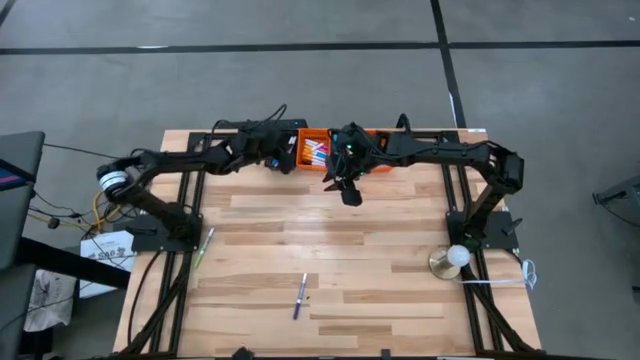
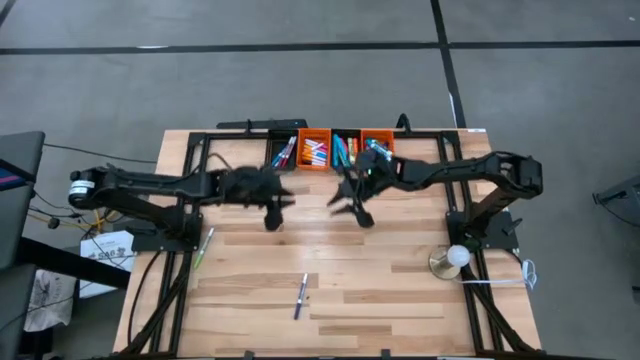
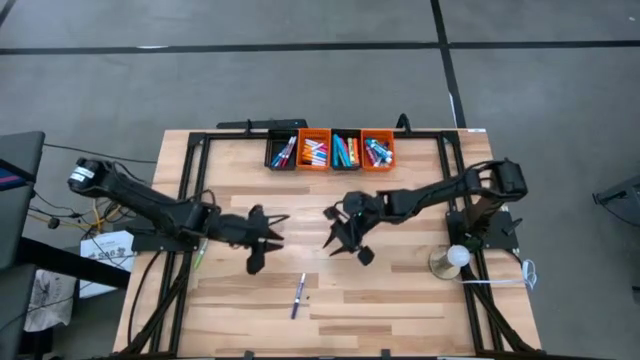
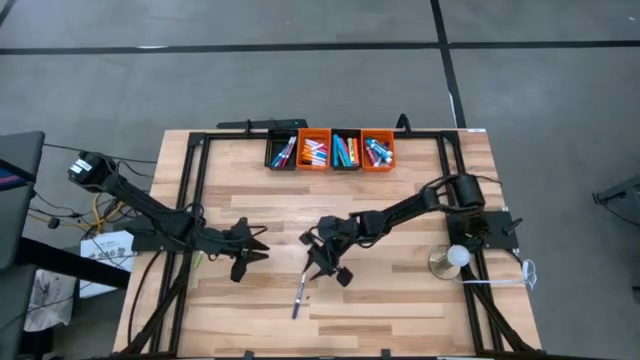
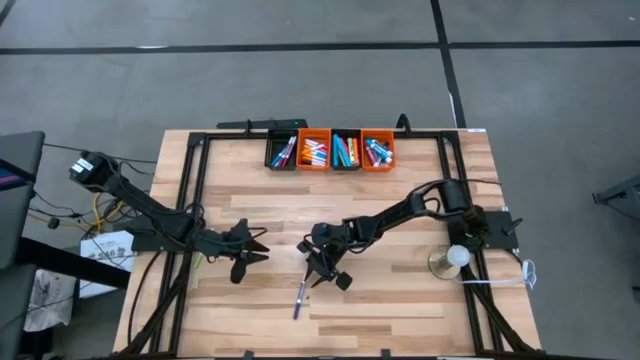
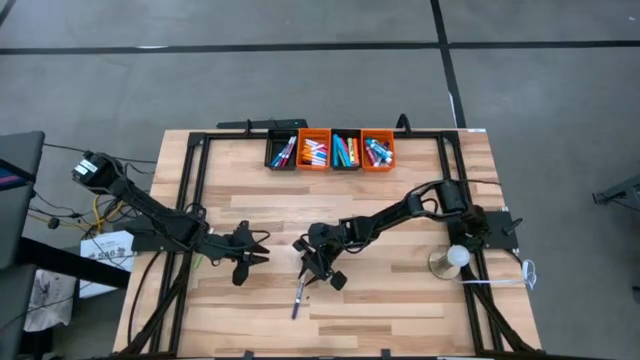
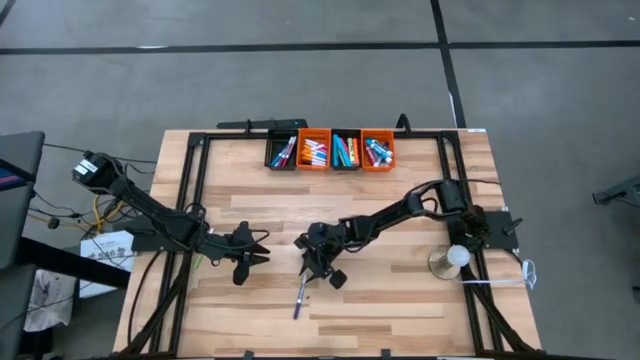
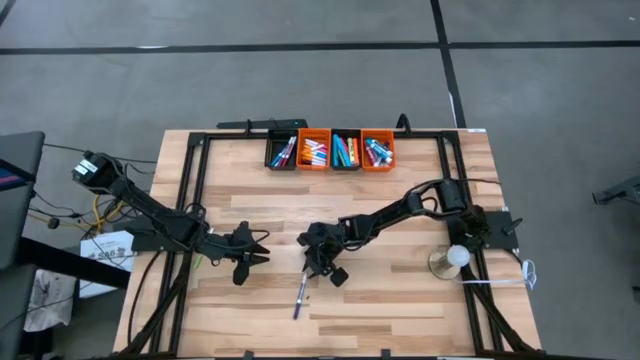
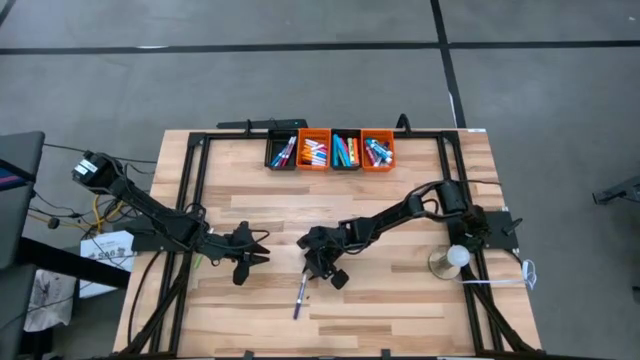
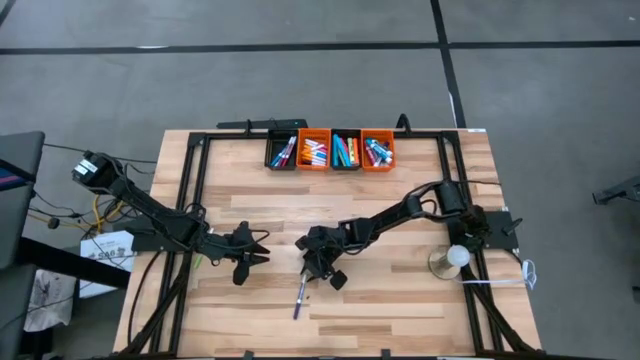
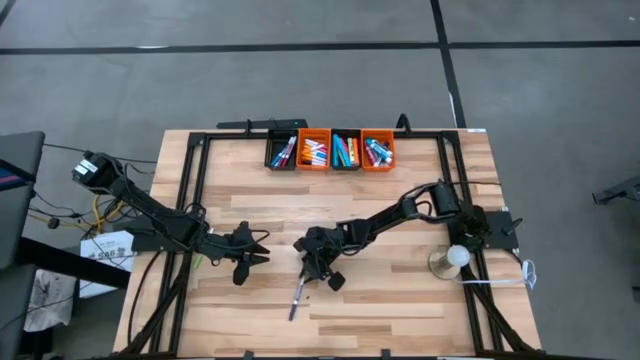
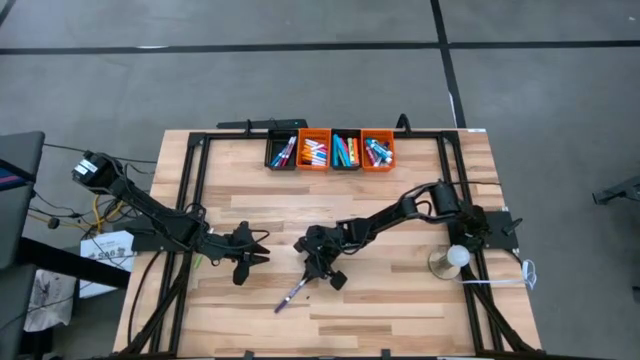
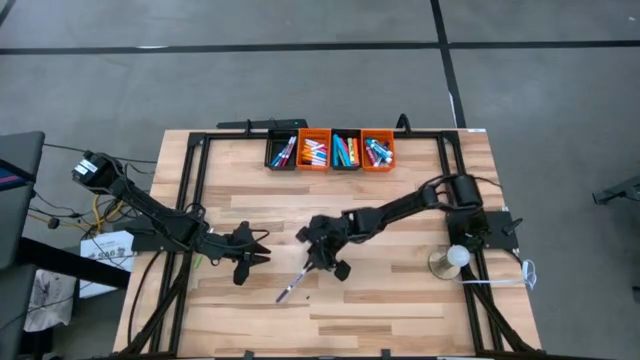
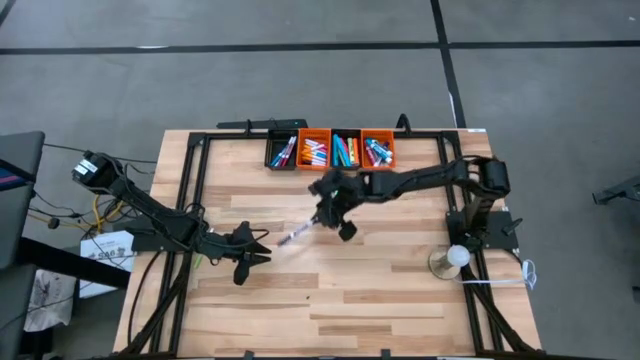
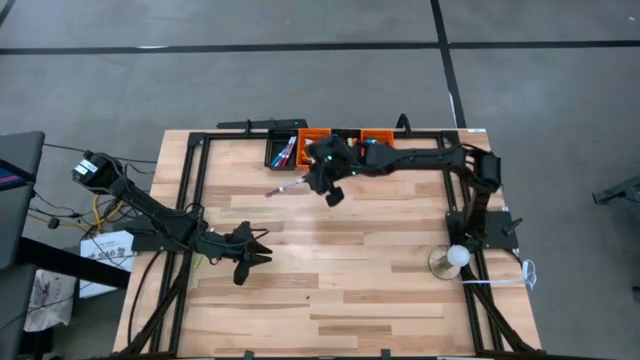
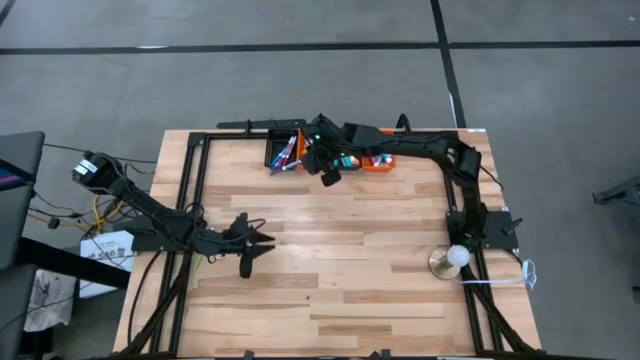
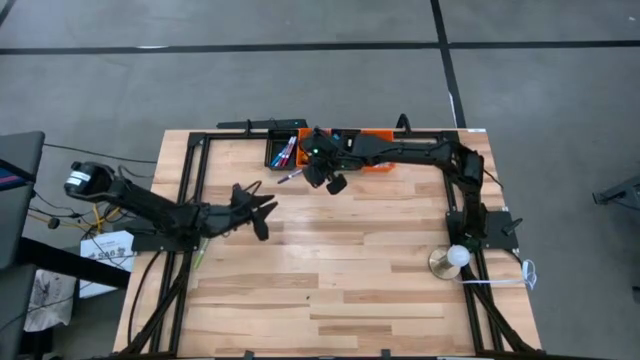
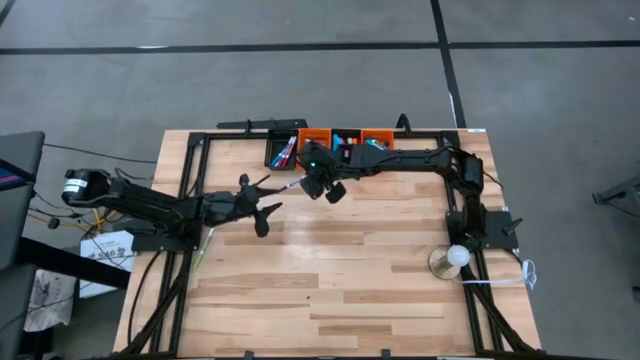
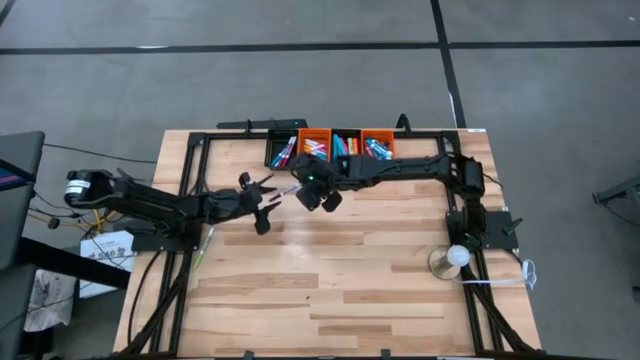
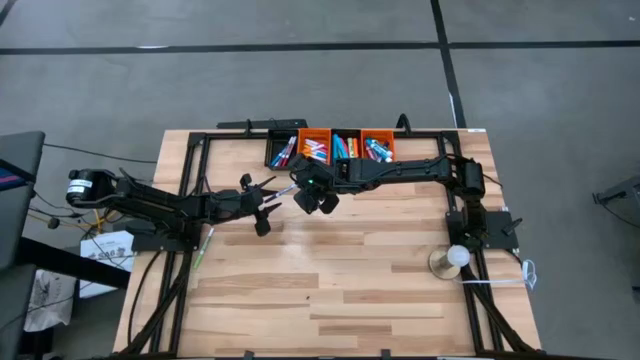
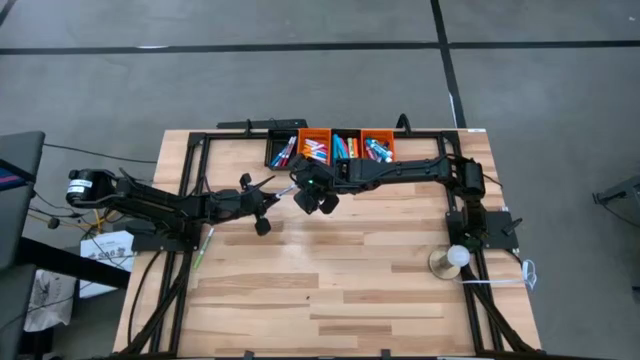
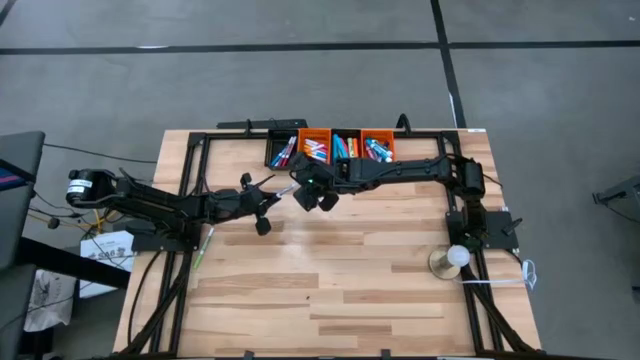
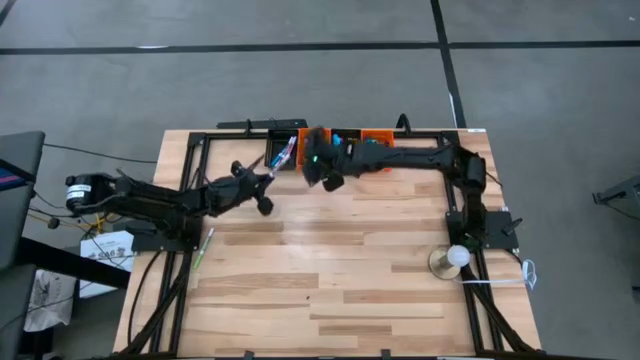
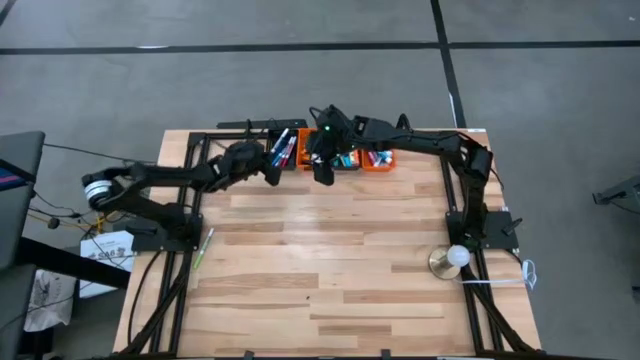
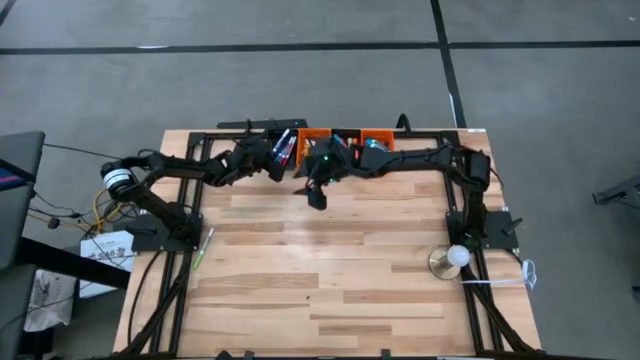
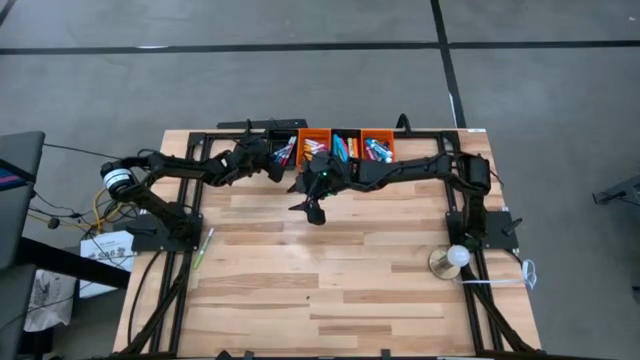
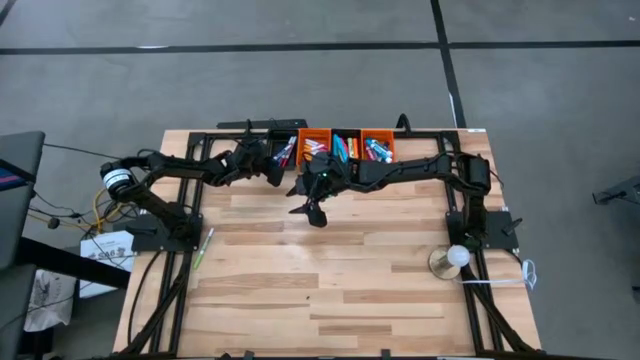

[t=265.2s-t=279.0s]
Task: Pick & Place Markers
Put the blue and white marker pen into the left black bin

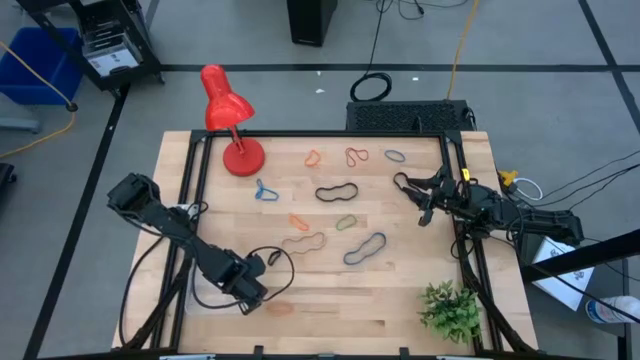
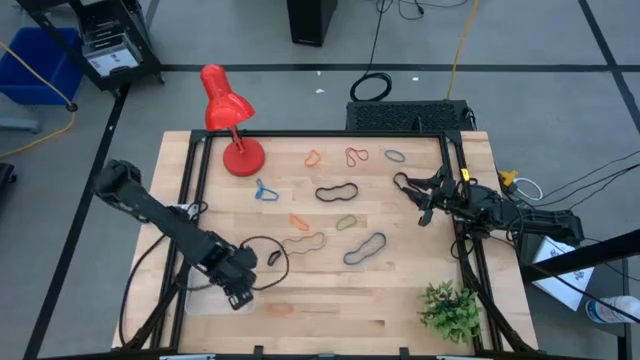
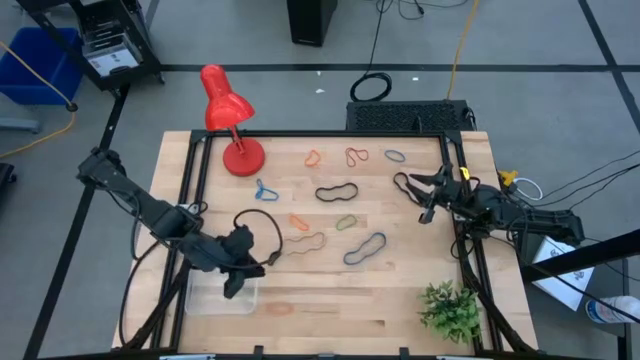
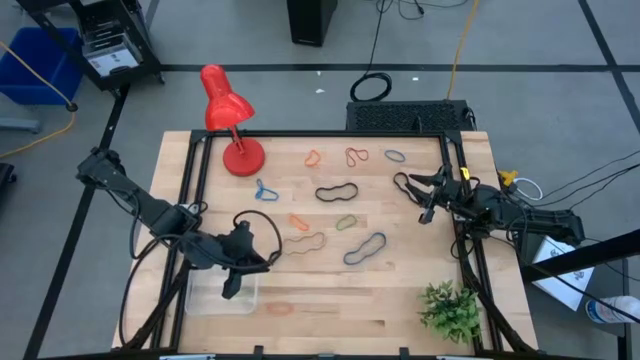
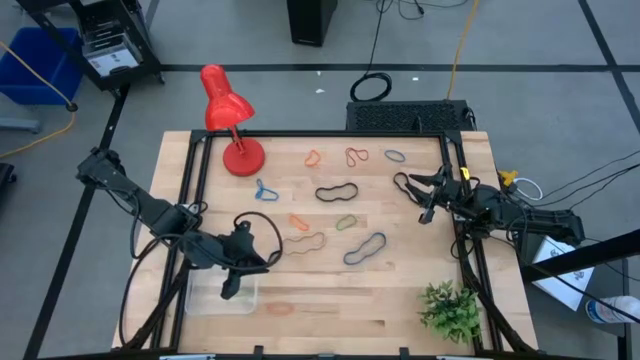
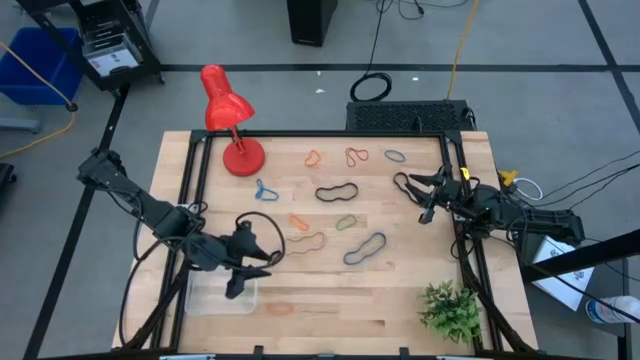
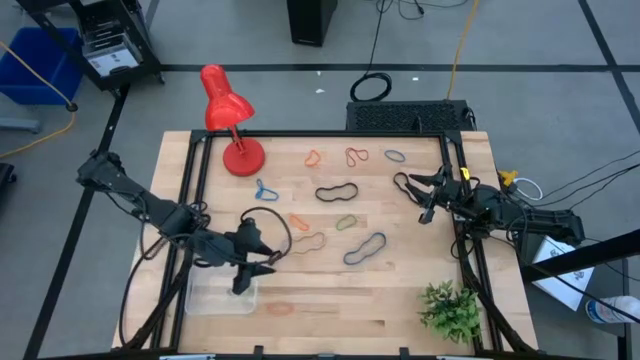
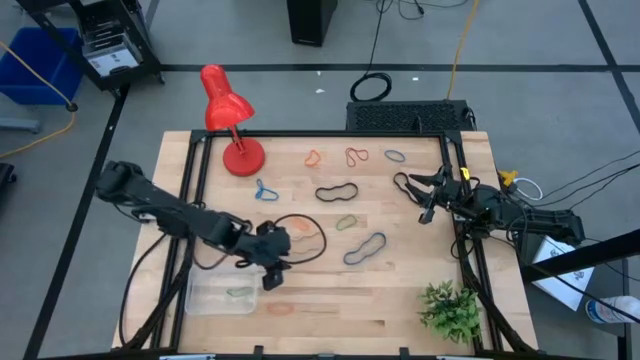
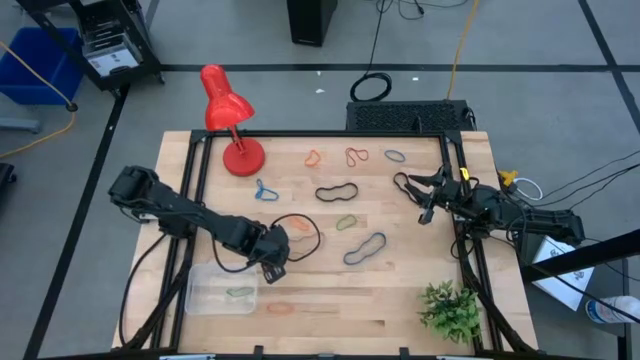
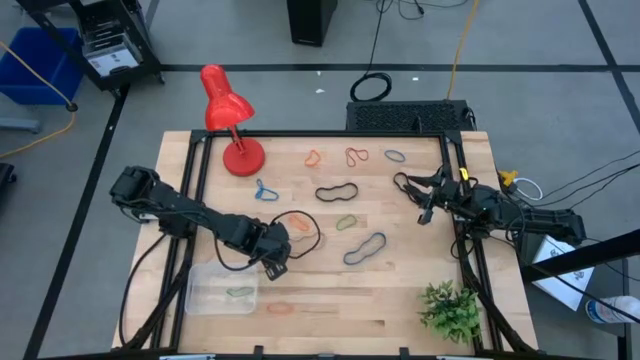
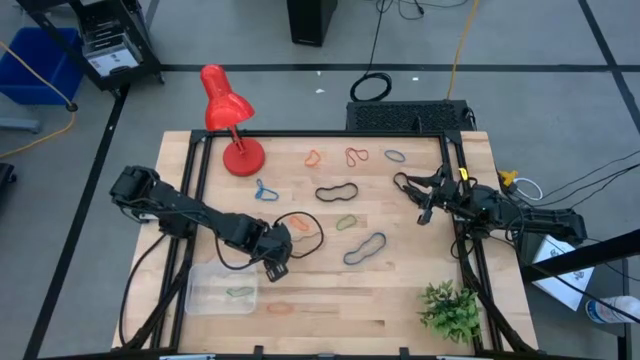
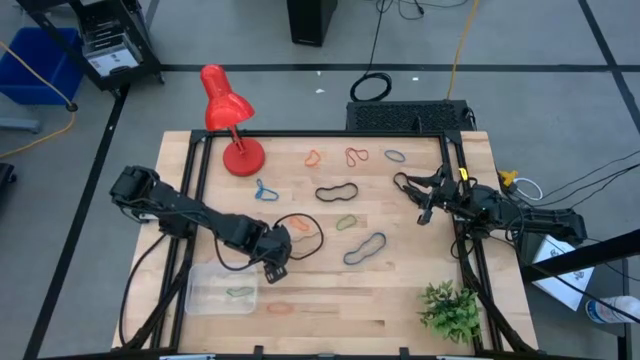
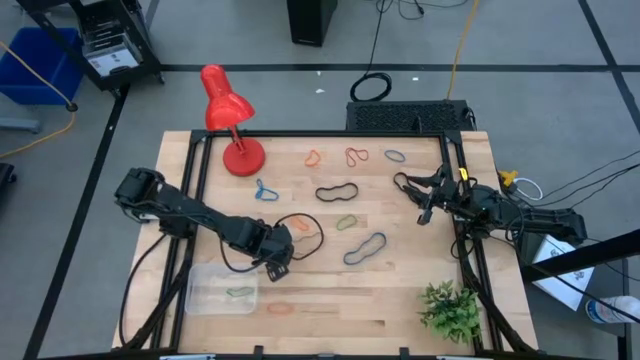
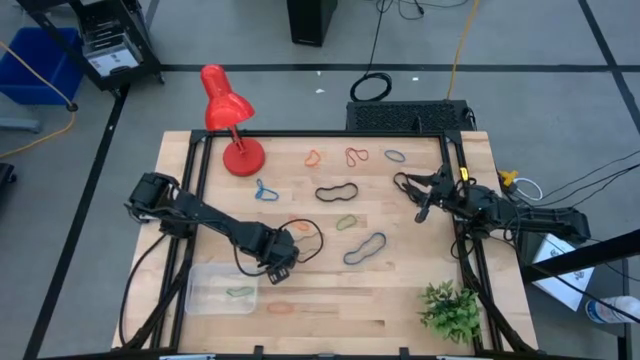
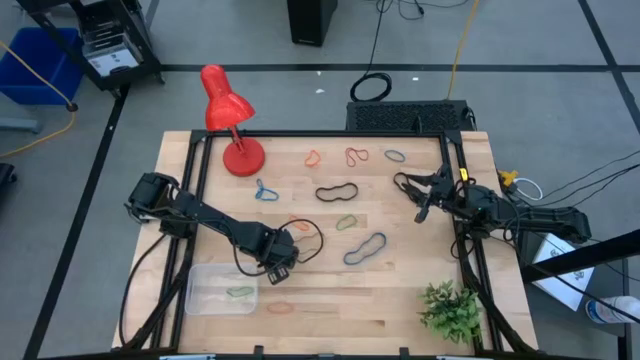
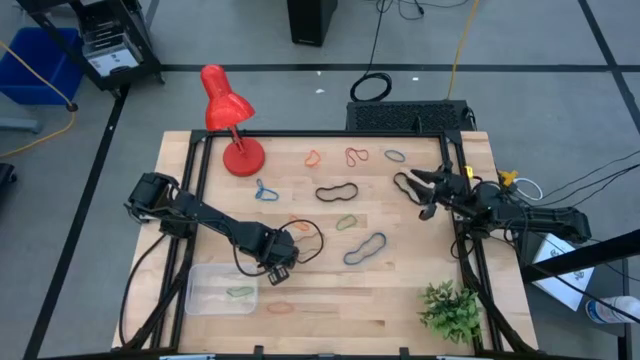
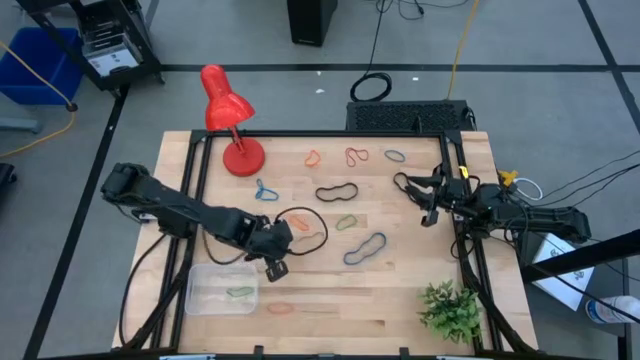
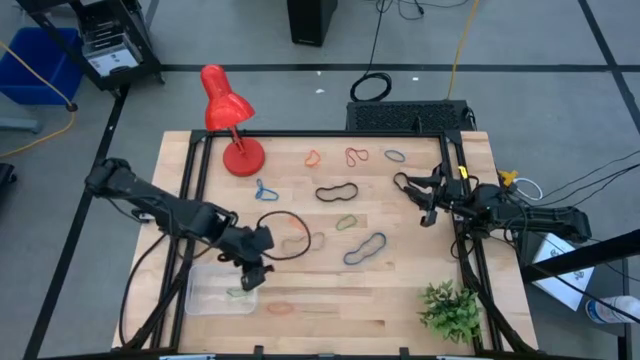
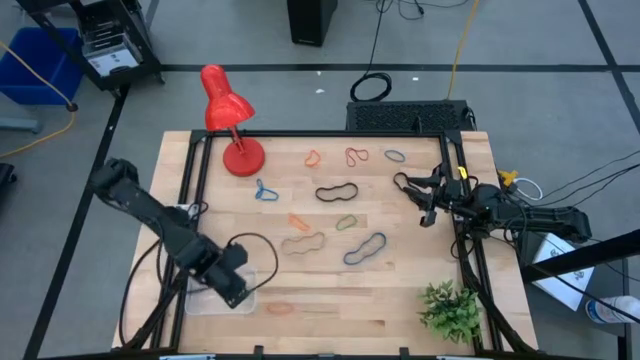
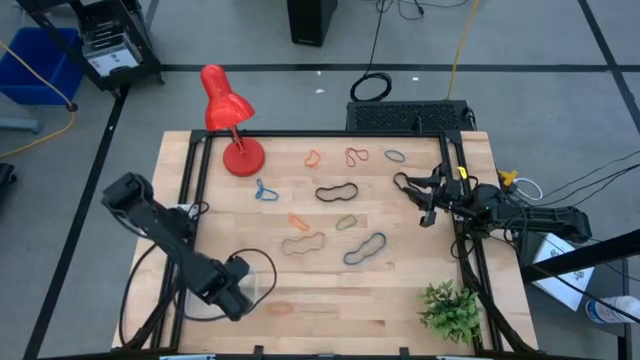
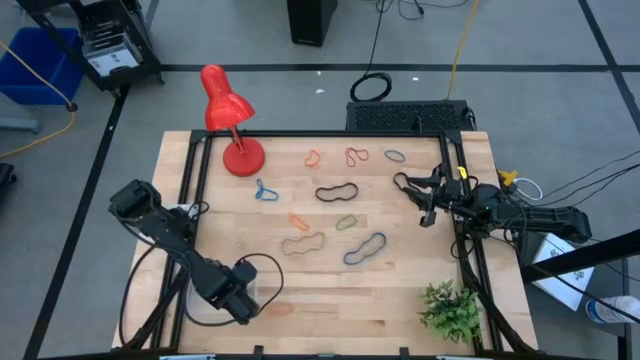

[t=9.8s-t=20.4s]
Task: Pick and place rubber bands into bin
Put the bottom black rubber band into the transparent bin
